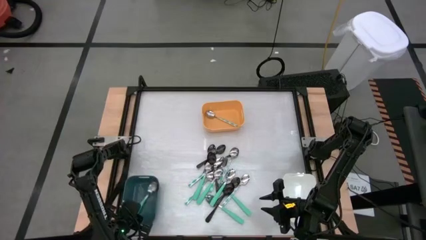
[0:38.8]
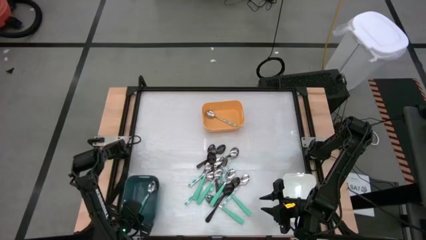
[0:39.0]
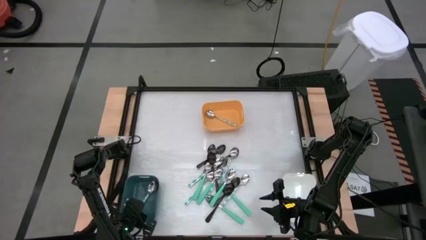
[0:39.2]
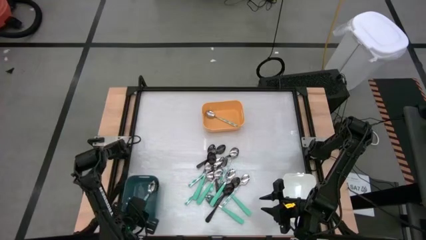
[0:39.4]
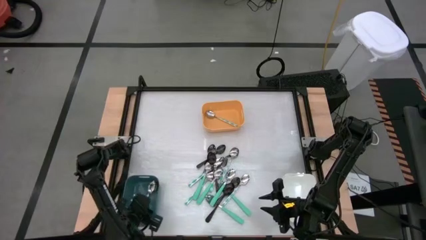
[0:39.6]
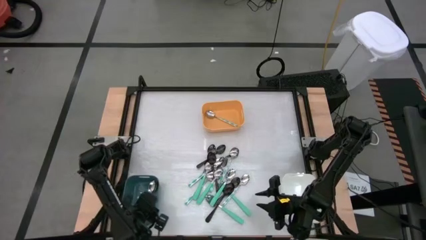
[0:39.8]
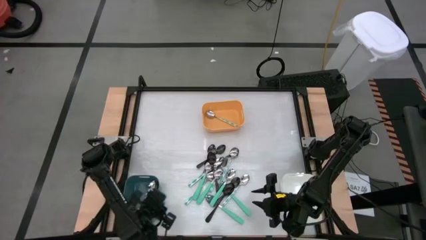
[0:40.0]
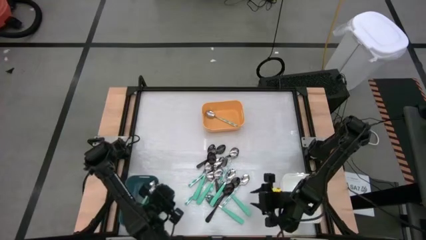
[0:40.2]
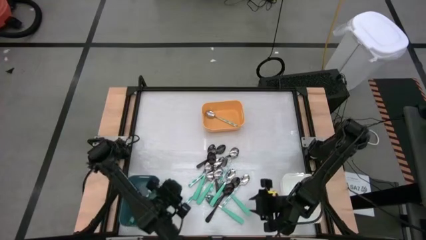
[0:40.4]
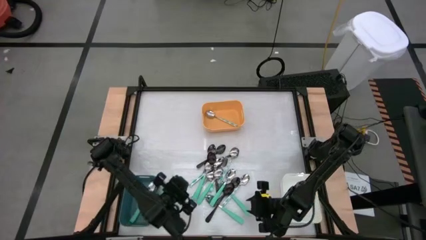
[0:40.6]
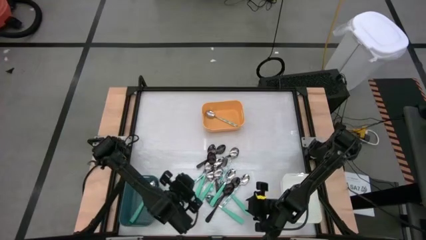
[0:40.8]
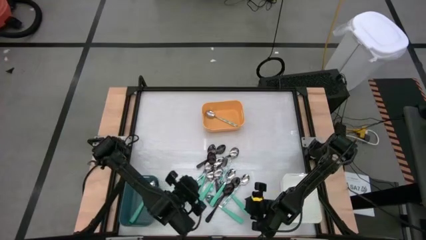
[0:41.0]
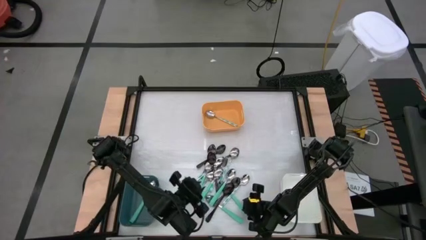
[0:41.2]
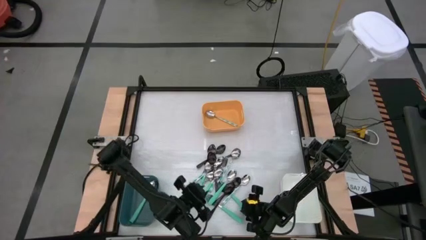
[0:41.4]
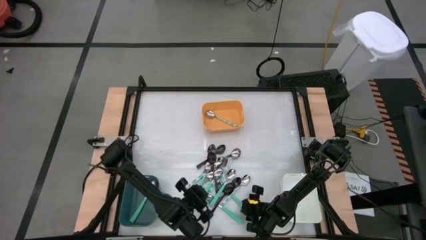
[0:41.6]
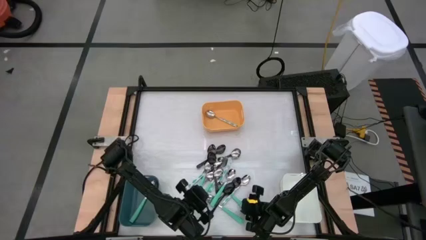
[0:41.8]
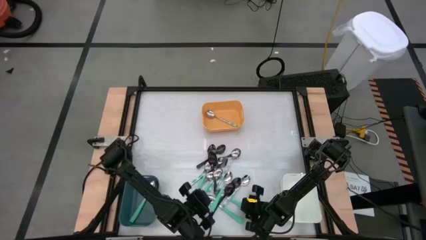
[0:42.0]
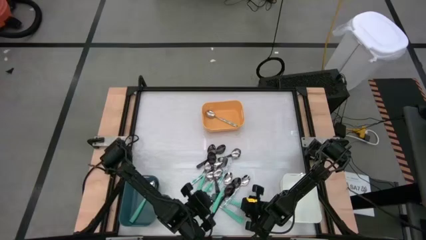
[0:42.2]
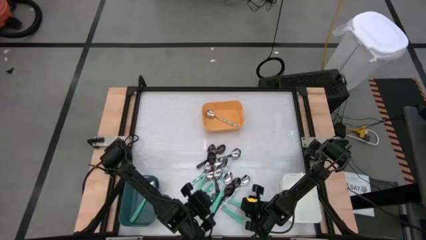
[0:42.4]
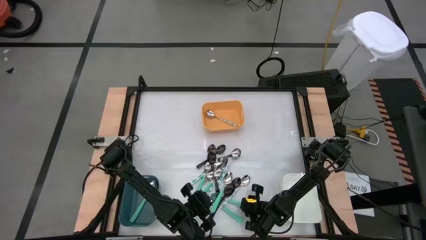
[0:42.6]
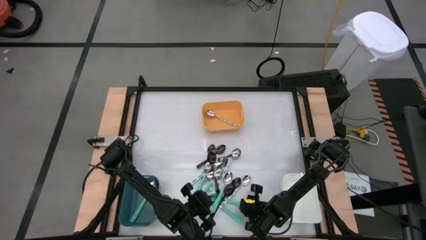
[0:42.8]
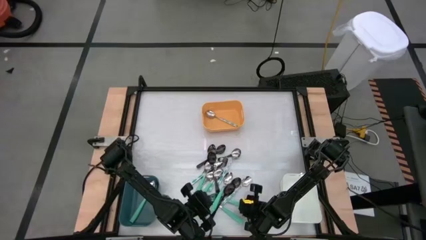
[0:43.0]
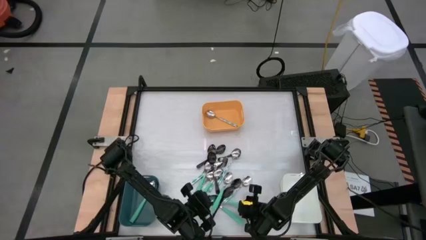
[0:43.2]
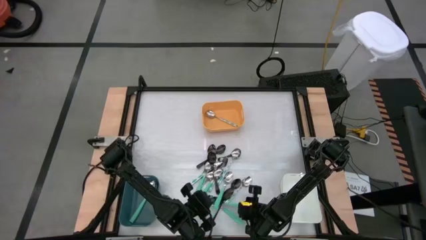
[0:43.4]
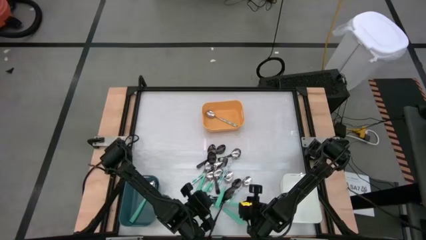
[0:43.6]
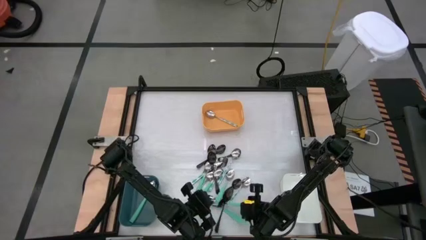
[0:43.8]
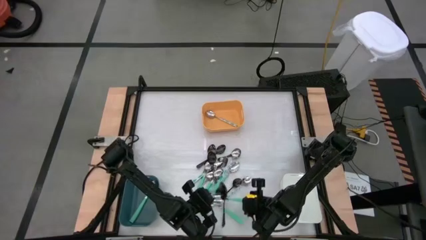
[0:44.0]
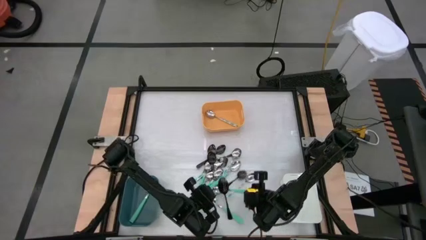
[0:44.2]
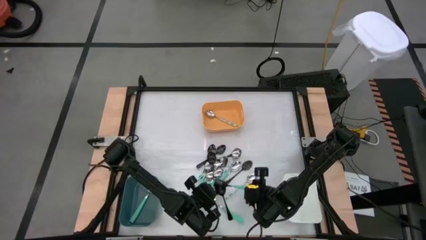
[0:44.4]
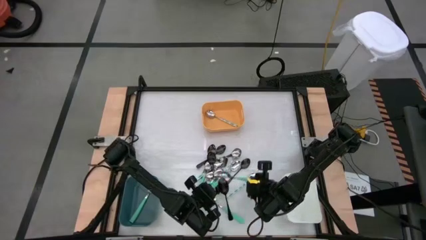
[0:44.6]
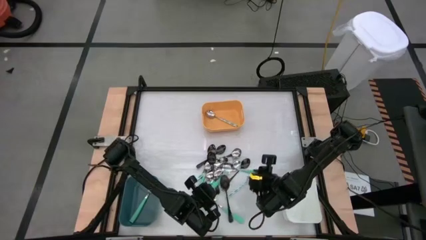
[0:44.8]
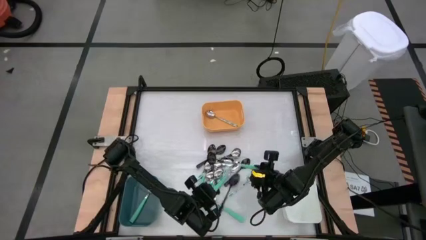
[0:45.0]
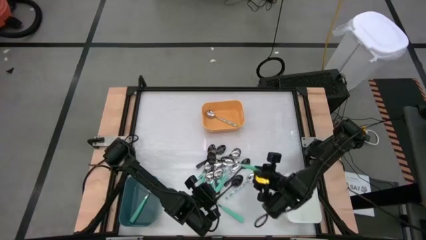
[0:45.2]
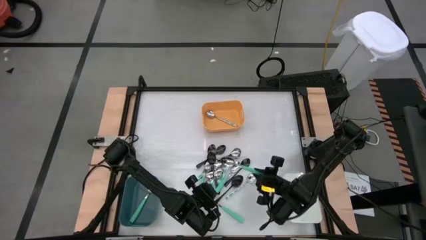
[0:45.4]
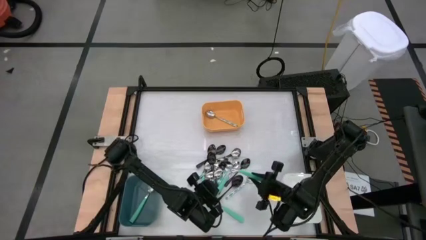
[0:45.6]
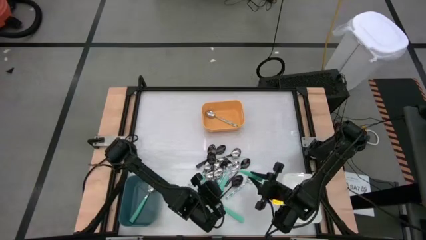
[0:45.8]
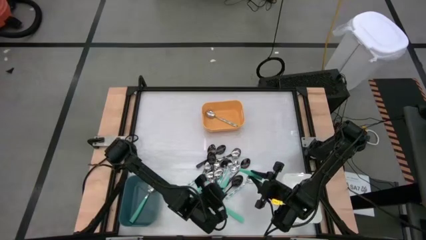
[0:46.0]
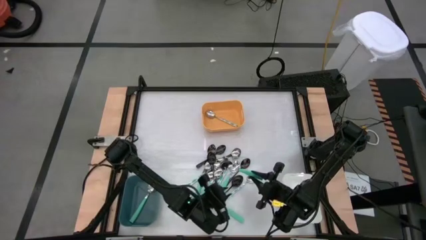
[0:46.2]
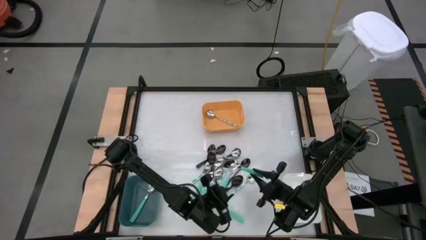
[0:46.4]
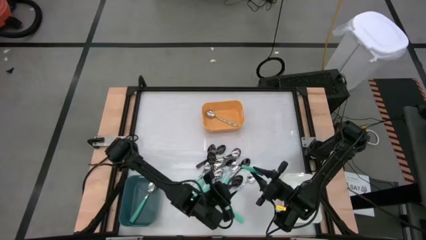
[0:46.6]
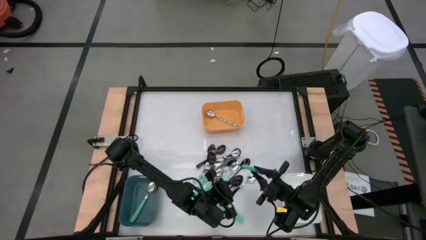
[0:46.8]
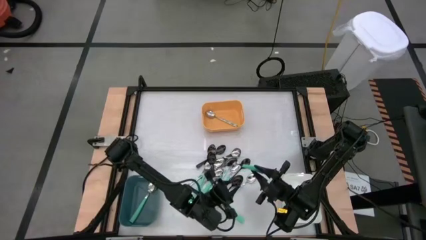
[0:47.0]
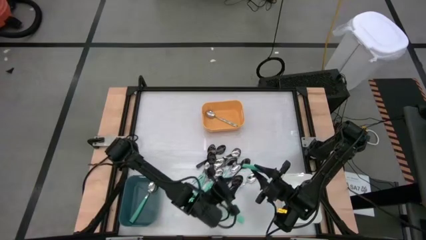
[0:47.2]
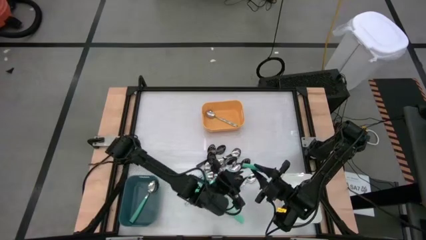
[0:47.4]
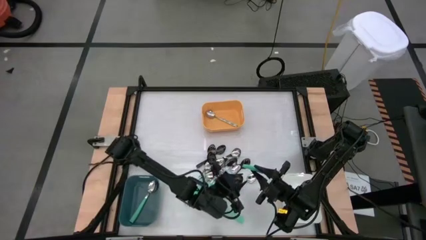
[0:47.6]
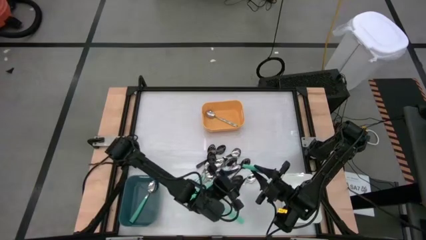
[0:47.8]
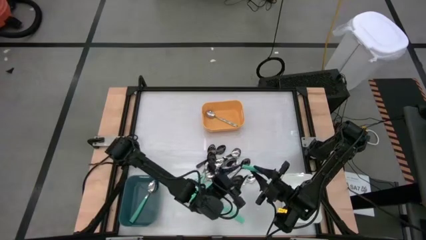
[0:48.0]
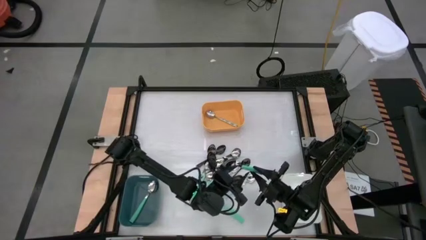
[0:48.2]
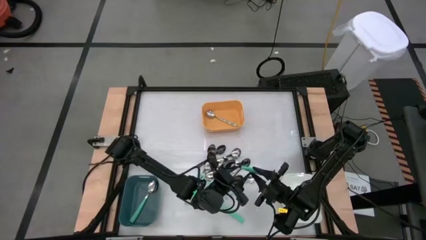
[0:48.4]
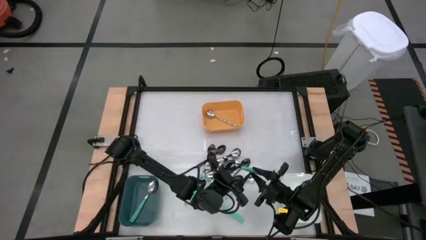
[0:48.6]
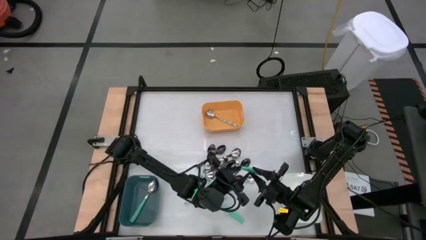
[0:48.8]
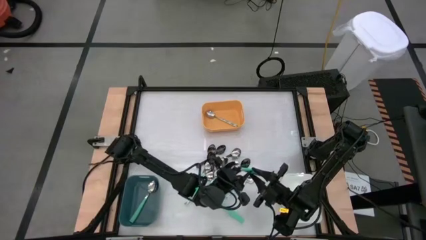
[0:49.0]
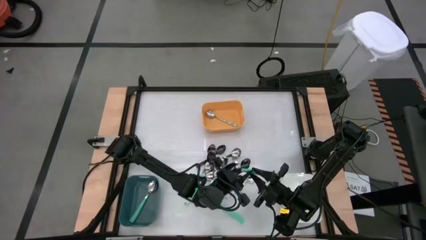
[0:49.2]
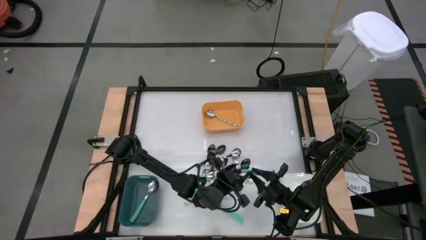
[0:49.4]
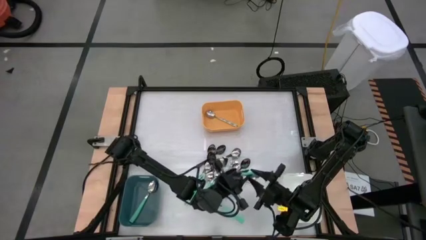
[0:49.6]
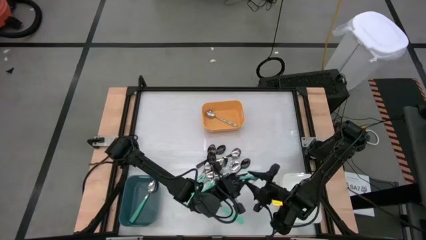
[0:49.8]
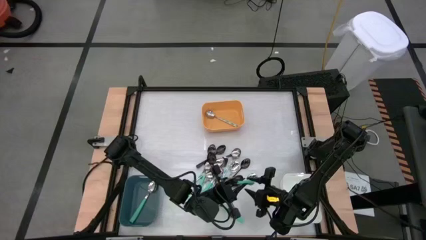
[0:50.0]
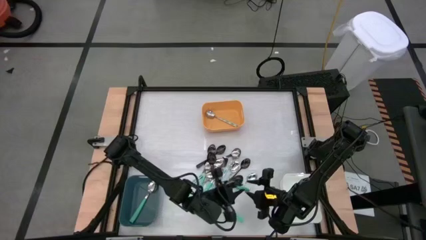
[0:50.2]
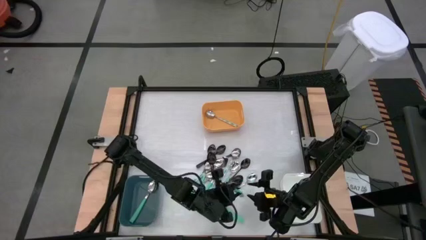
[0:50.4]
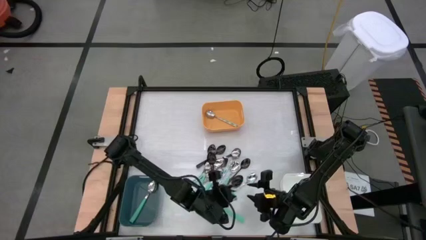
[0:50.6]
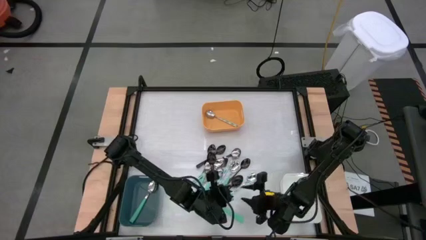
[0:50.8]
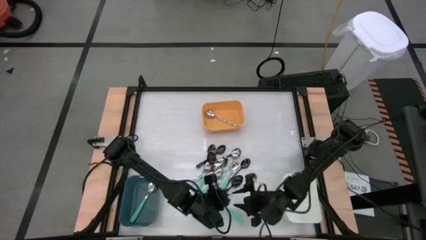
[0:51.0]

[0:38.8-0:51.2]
Task: Sort silverware by color (type)
Put the green spoon into the blue bin
